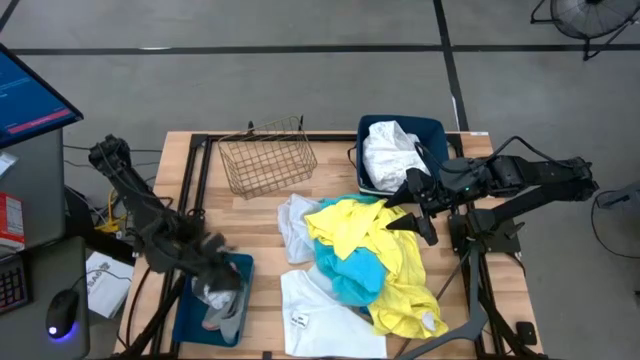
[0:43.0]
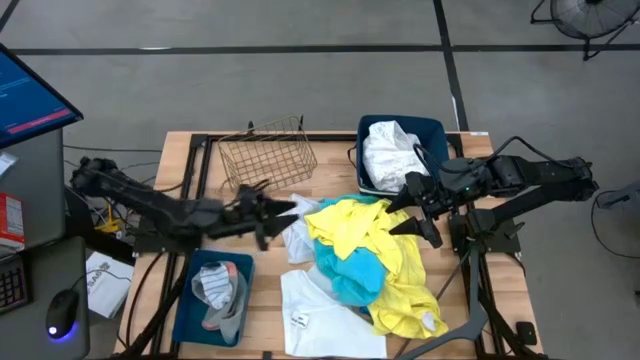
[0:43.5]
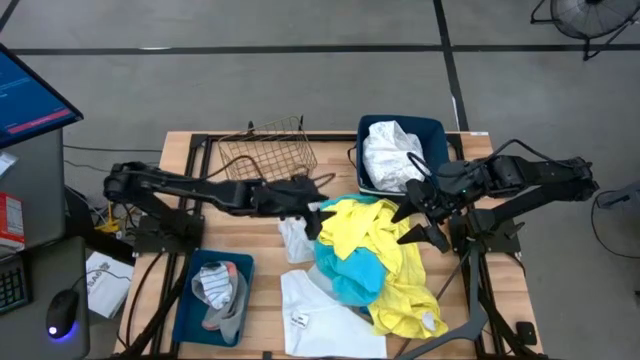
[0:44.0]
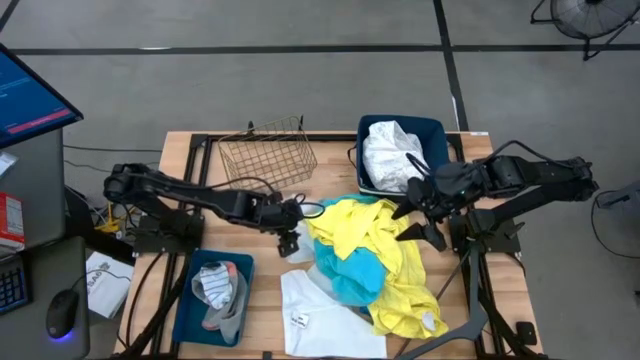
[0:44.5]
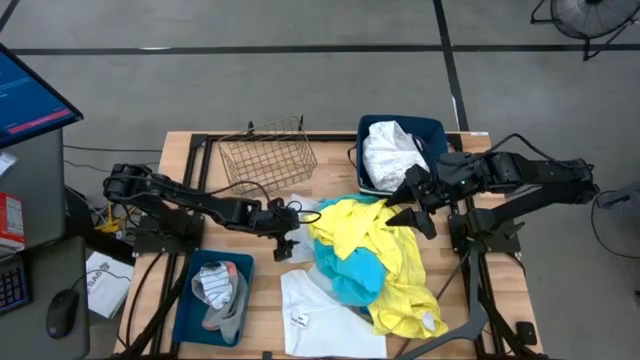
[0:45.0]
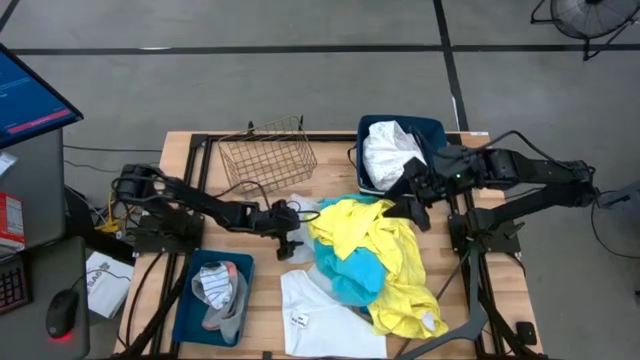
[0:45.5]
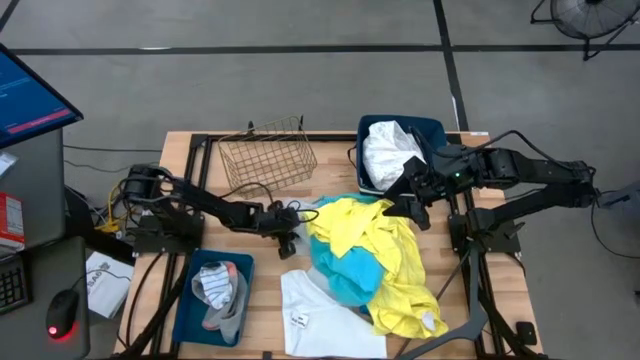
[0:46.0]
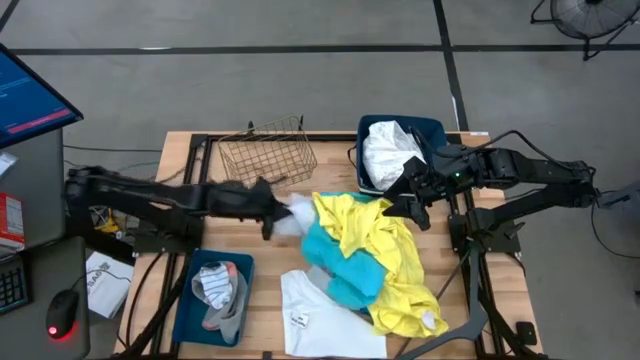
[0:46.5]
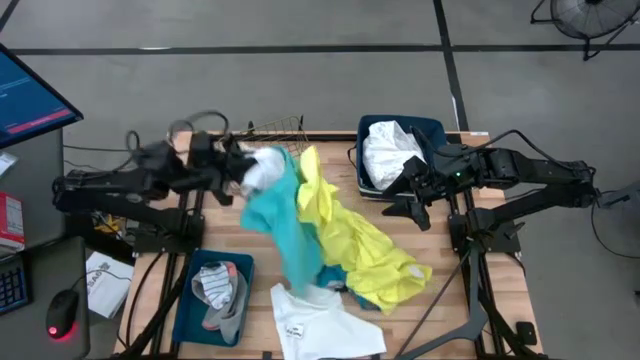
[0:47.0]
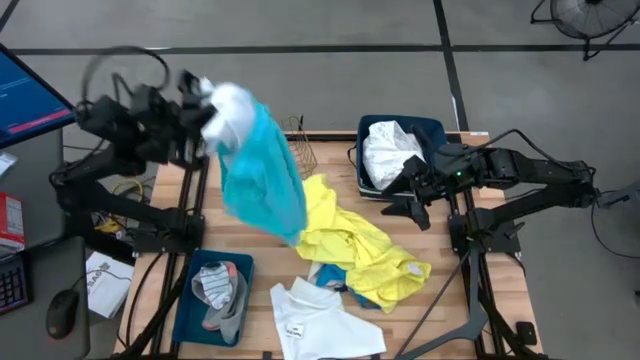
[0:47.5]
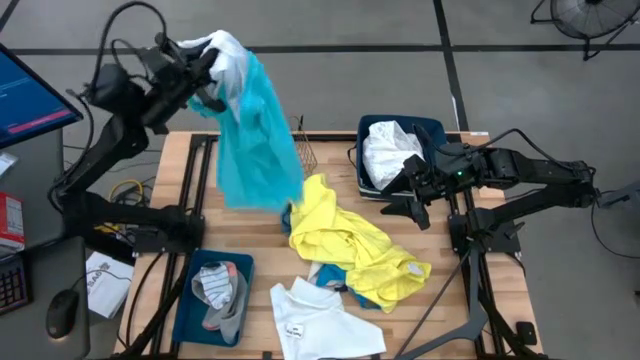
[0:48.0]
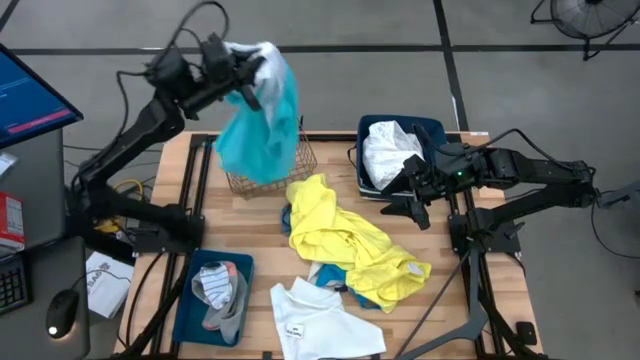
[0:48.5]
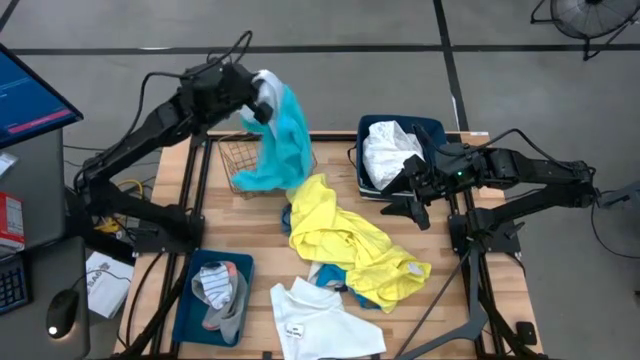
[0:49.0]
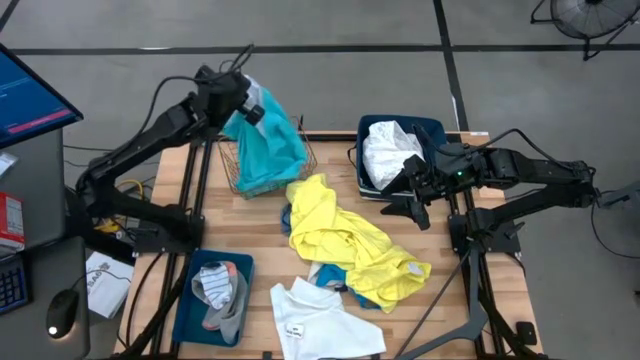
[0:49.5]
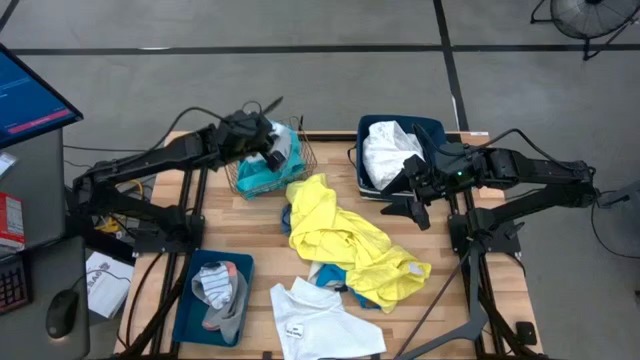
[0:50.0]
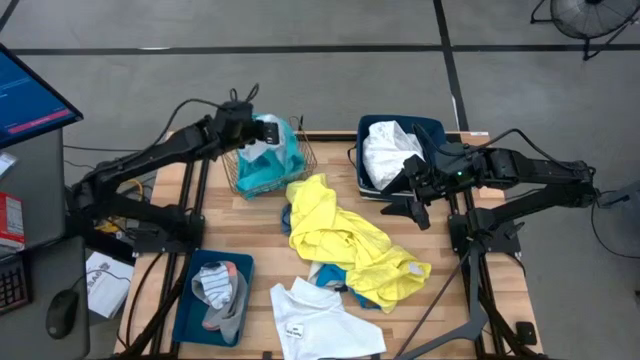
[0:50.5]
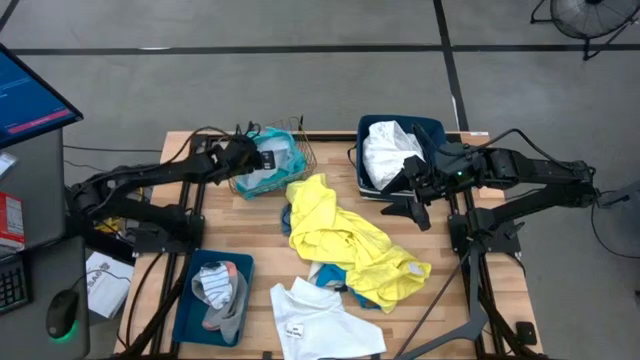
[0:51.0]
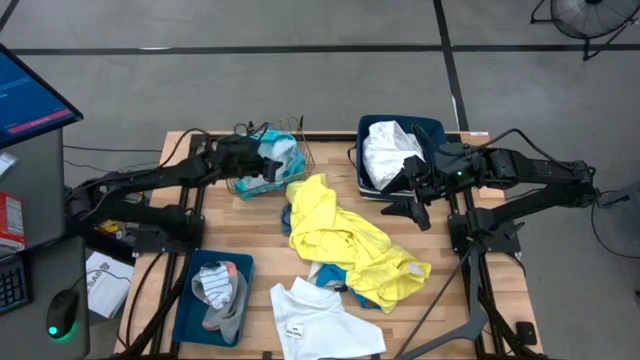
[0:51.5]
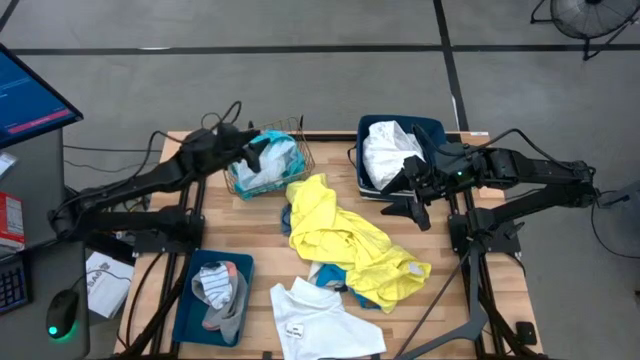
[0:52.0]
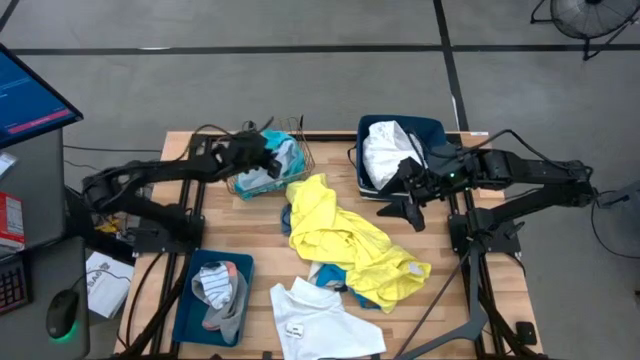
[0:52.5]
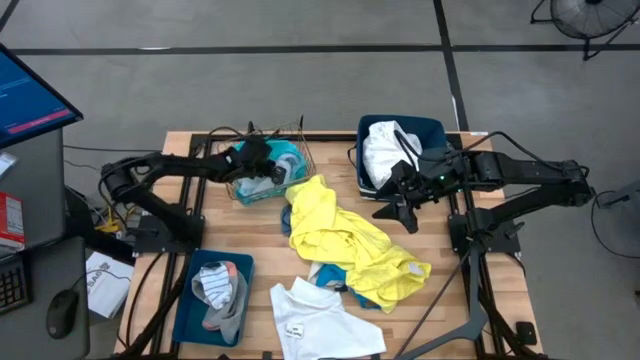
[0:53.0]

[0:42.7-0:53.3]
Task: Pick & Place Cloths
Put the light blue shorts into the gold wire basket

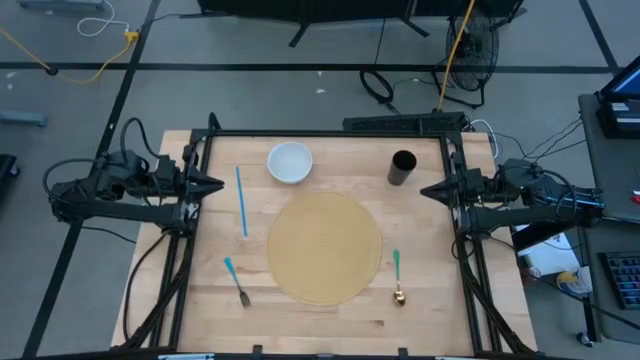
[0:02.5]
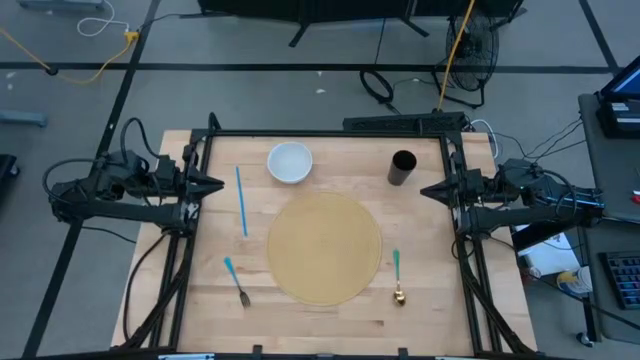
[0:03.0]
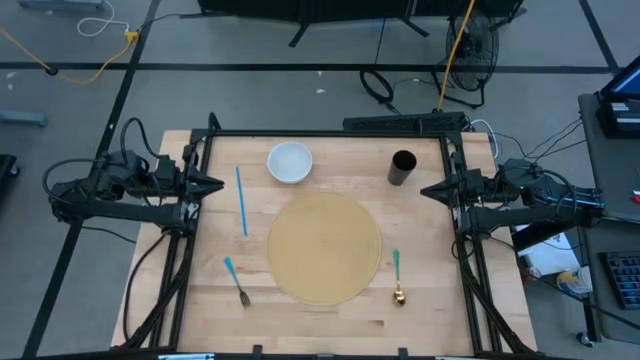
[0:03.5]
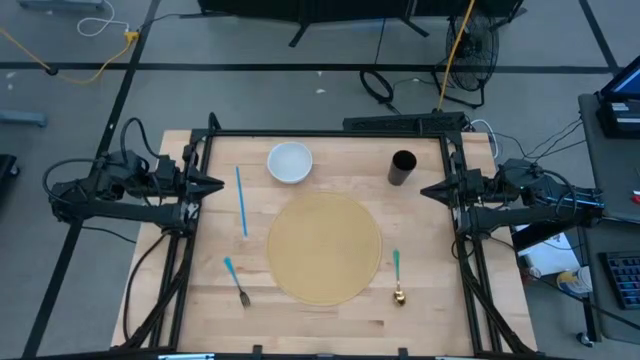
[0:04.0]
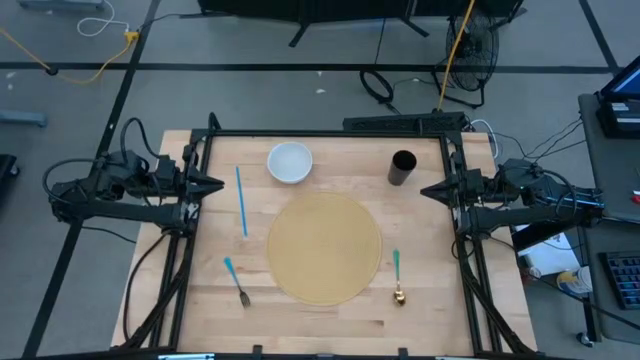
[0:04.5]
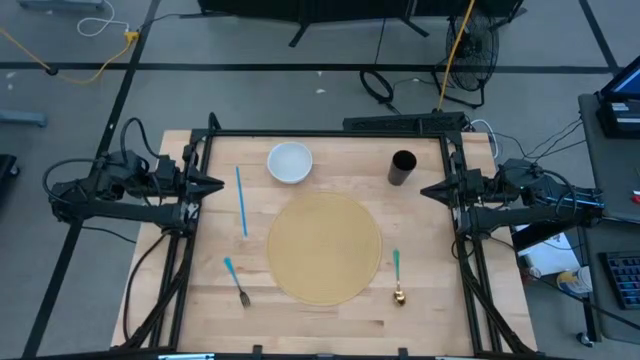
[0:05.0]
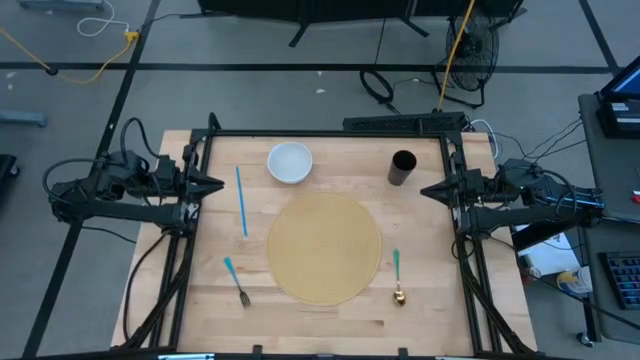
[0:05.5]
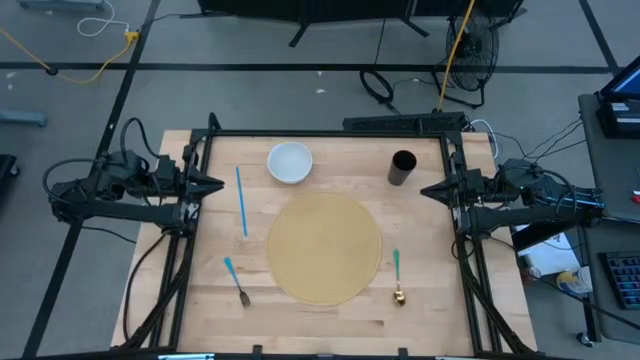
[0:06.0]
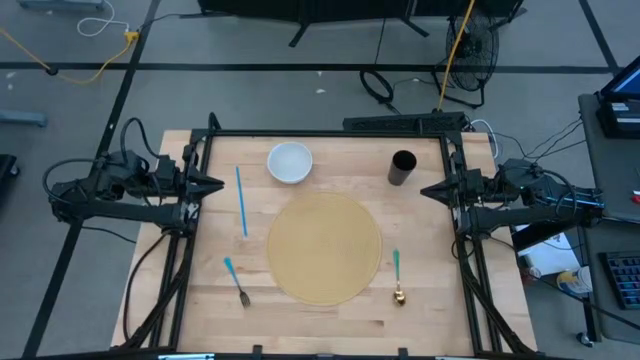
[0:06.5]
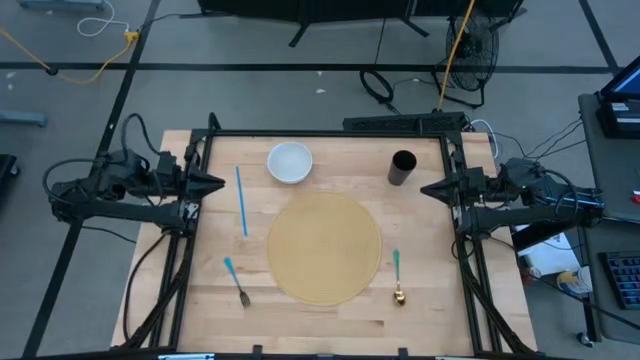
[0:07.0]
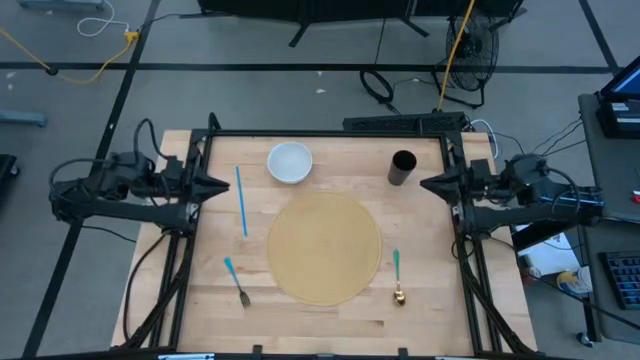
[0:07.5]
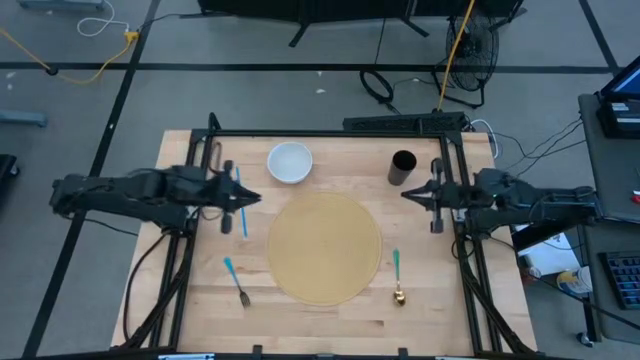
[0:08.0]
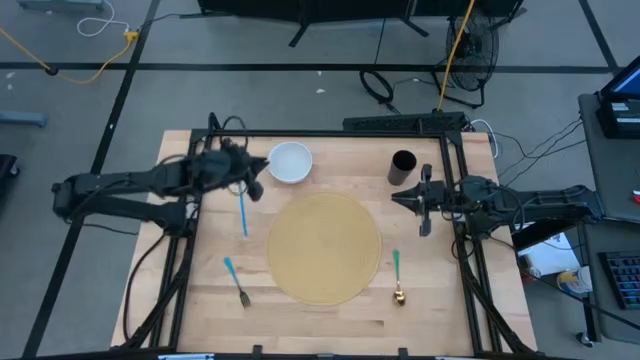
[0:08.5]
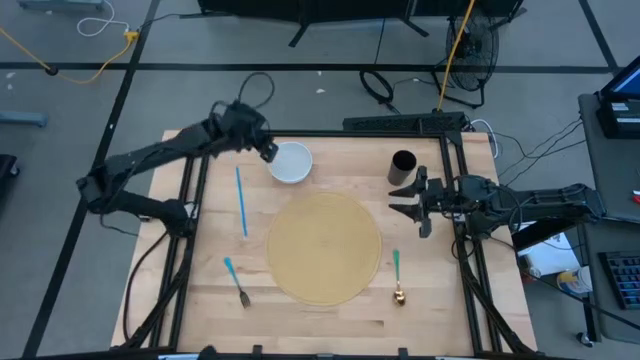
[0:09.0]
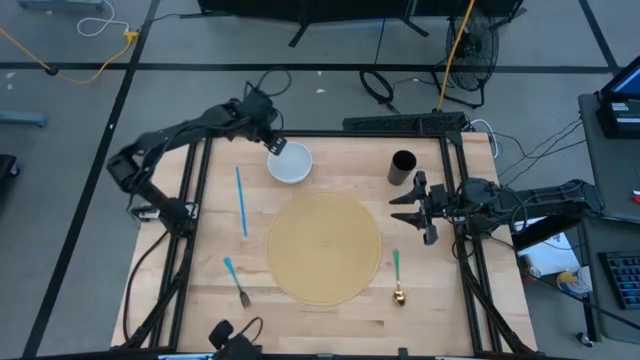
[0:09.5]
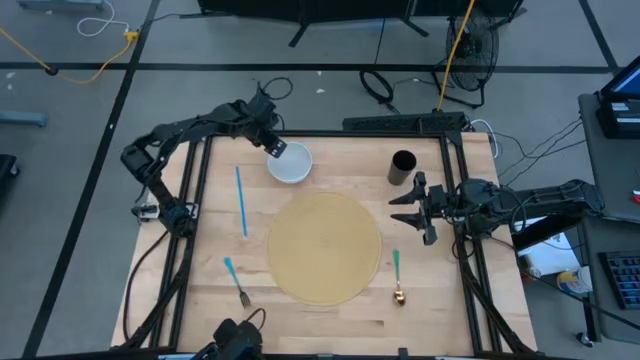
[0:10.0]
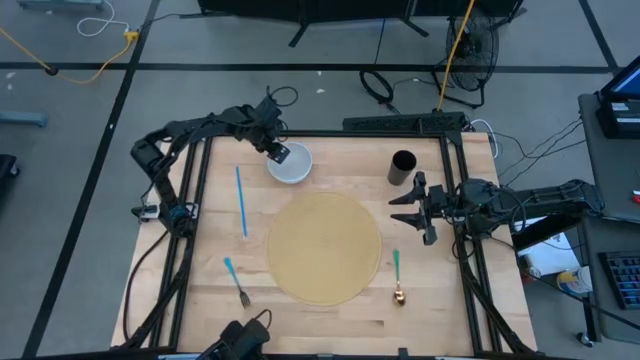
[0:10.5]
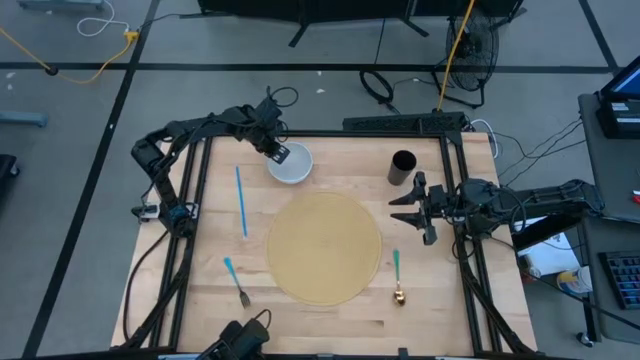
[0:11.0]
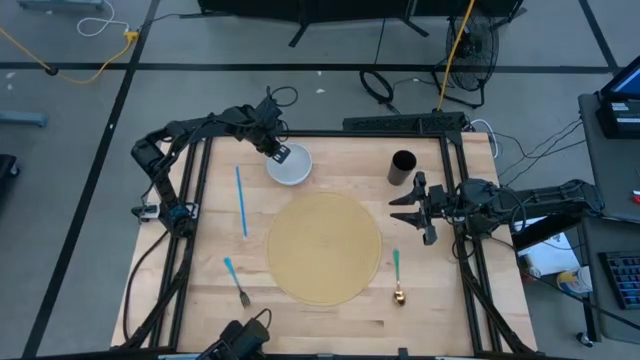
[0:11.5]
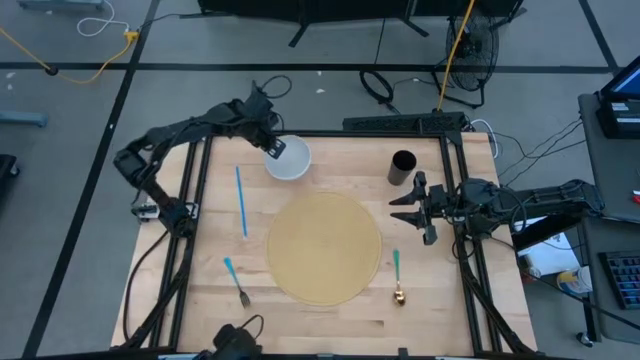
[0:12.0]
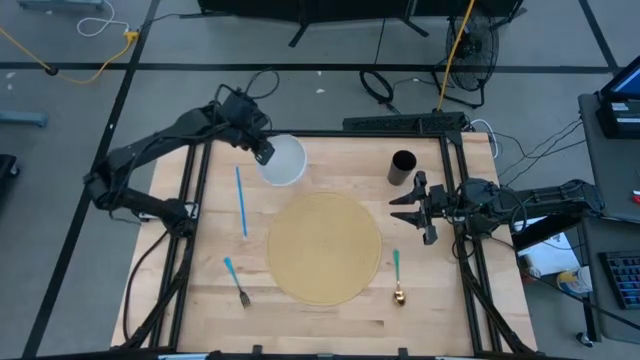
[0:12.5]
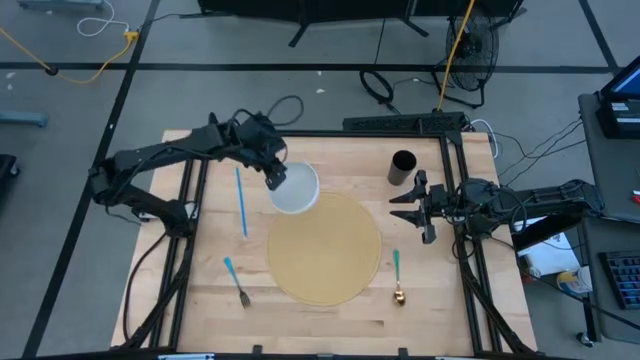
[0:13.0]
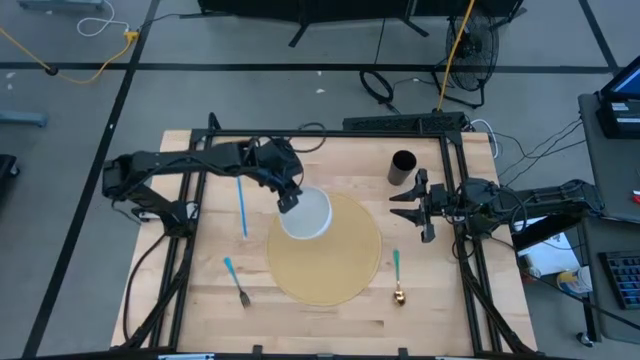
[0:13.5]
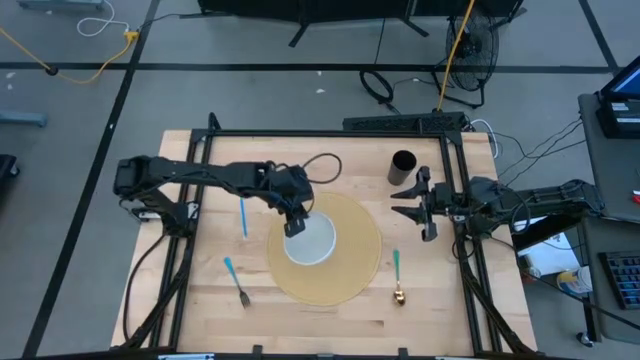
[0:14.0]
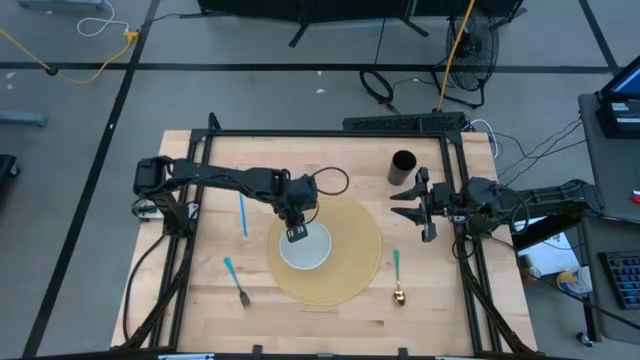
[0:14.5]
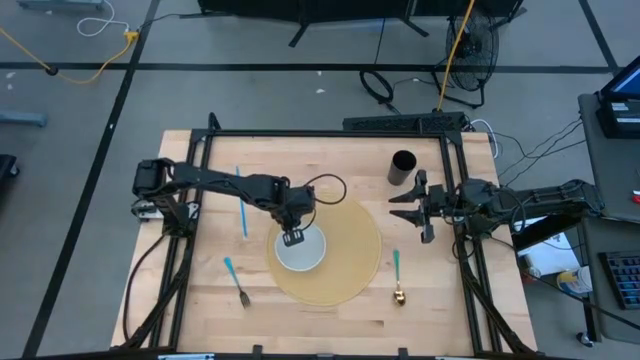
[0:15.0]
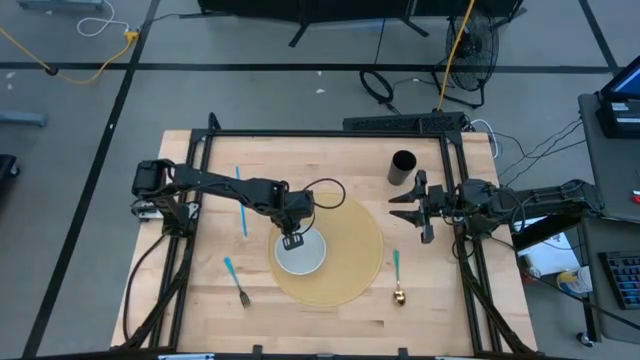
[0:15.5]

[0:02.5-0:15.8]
Task: Pick & Place Utensil
Put the white bowl on the brown mat
